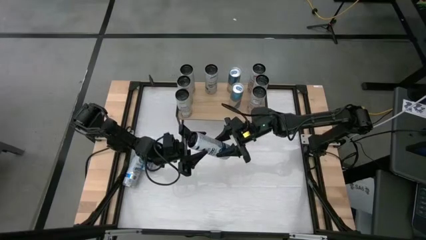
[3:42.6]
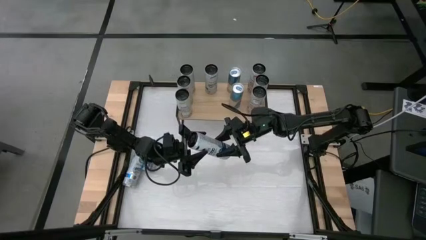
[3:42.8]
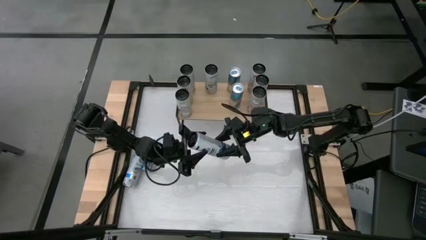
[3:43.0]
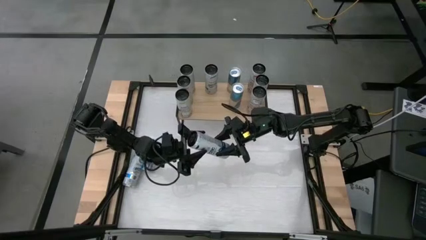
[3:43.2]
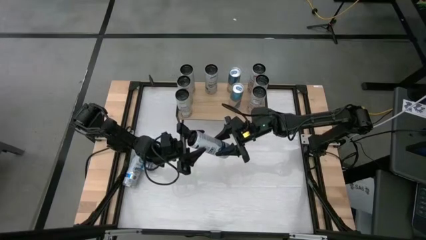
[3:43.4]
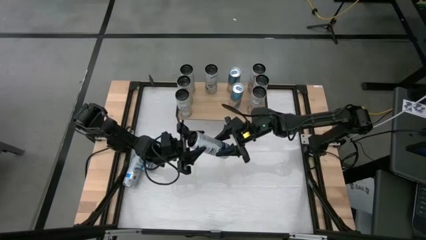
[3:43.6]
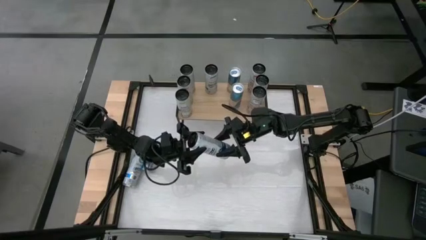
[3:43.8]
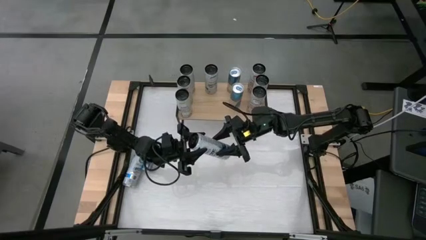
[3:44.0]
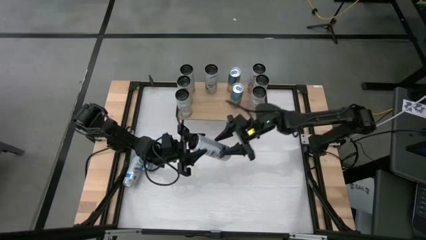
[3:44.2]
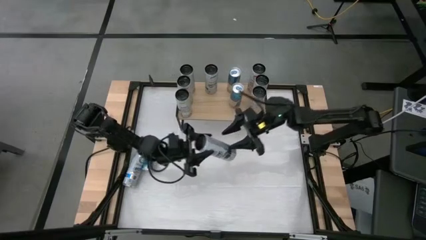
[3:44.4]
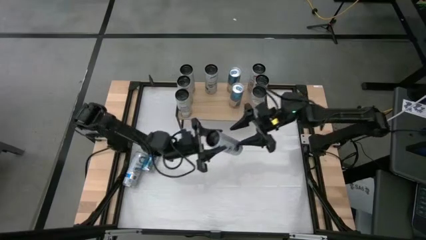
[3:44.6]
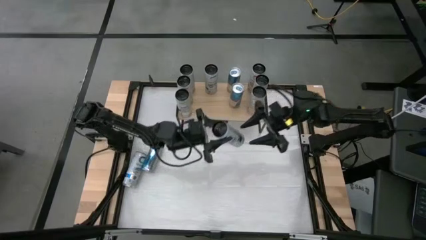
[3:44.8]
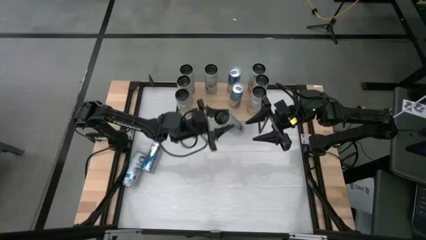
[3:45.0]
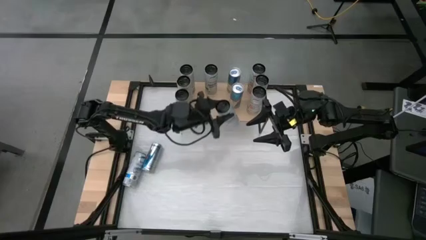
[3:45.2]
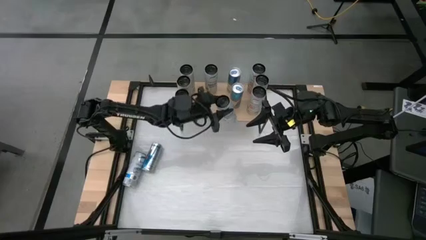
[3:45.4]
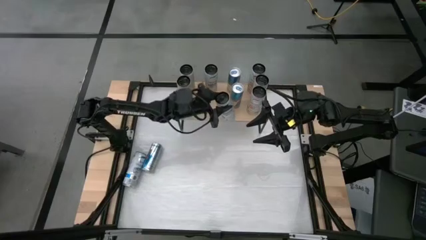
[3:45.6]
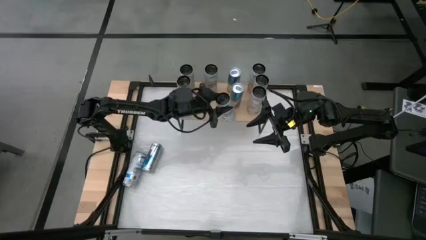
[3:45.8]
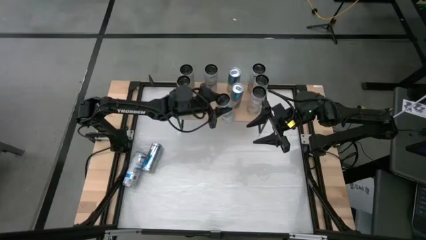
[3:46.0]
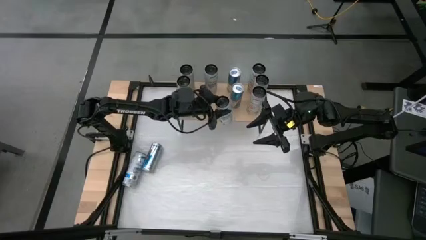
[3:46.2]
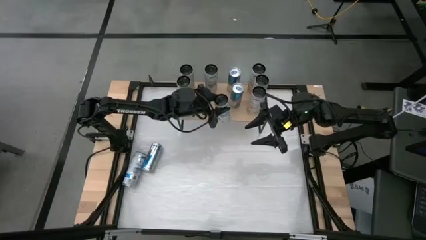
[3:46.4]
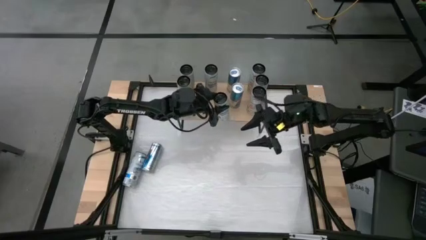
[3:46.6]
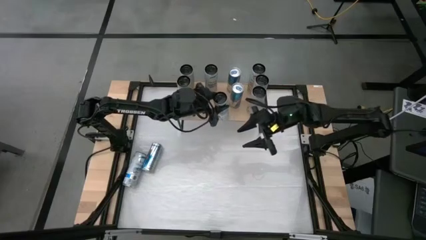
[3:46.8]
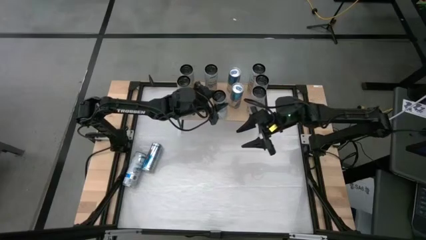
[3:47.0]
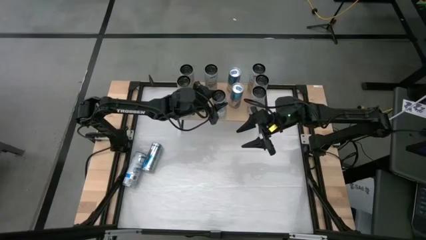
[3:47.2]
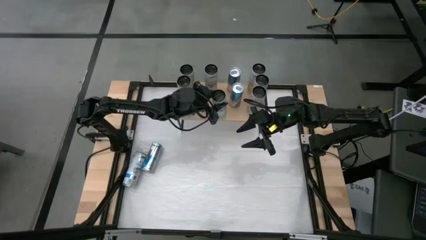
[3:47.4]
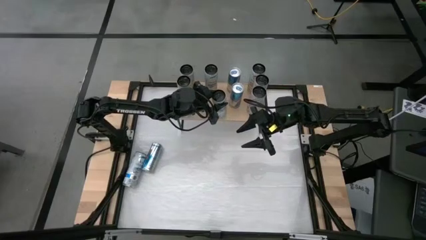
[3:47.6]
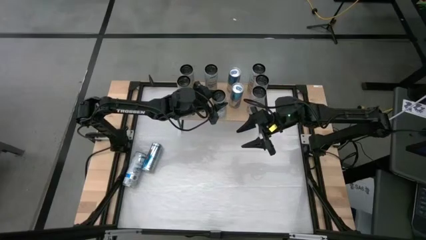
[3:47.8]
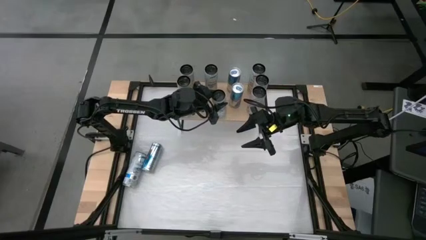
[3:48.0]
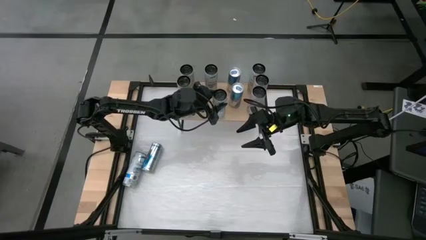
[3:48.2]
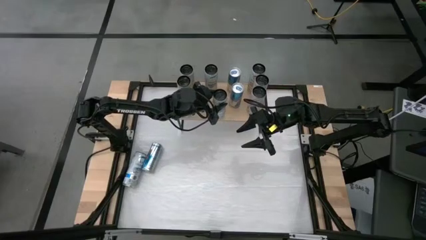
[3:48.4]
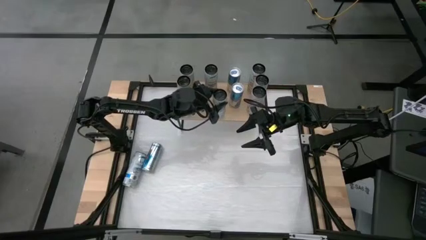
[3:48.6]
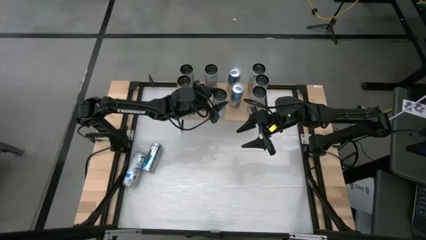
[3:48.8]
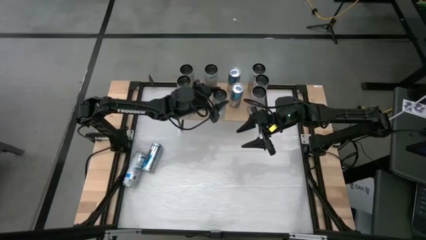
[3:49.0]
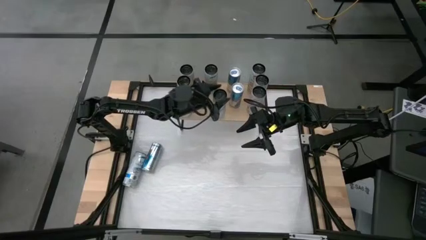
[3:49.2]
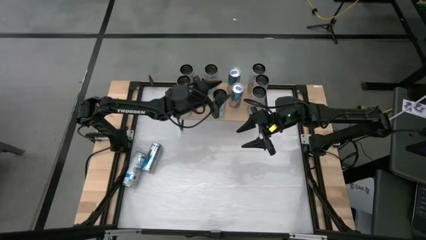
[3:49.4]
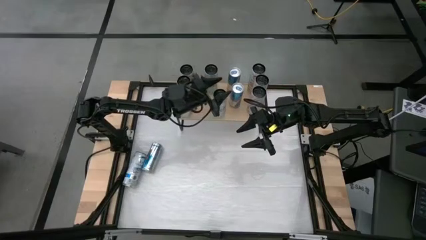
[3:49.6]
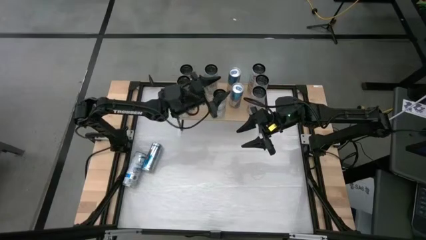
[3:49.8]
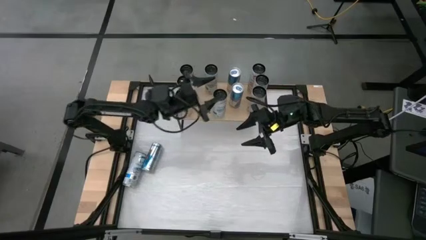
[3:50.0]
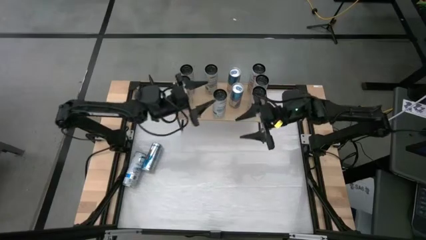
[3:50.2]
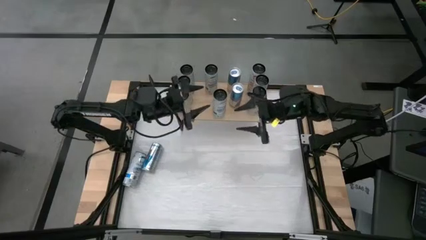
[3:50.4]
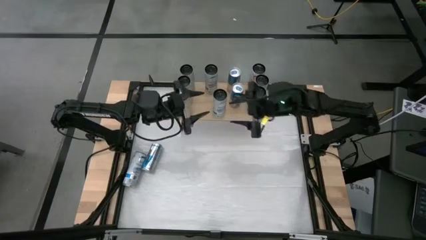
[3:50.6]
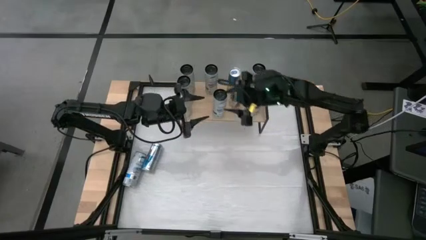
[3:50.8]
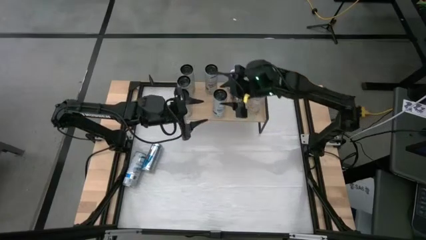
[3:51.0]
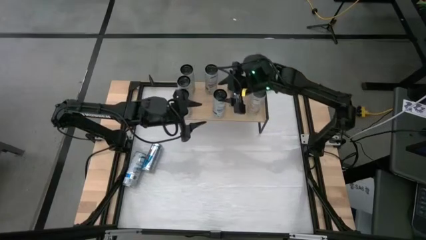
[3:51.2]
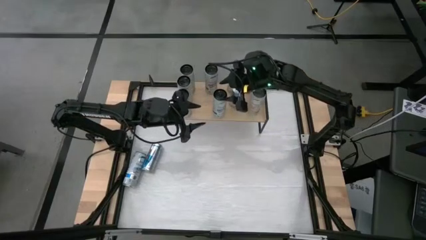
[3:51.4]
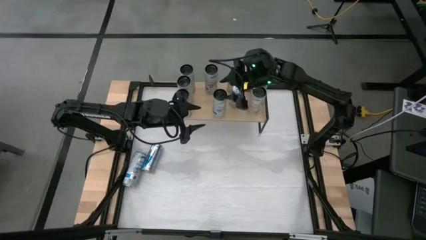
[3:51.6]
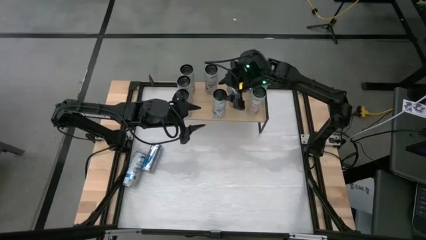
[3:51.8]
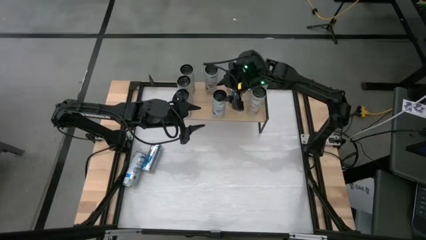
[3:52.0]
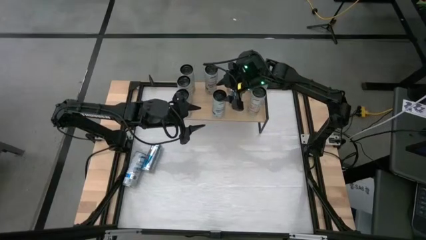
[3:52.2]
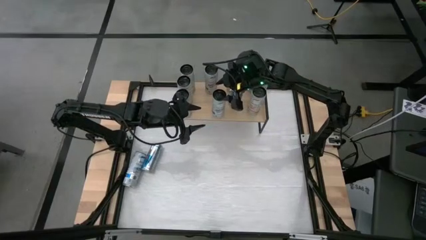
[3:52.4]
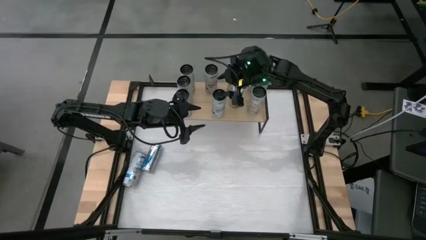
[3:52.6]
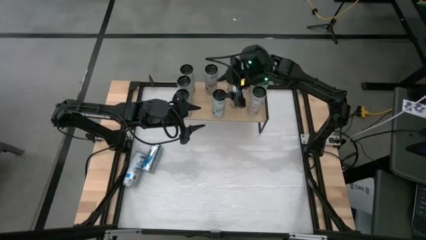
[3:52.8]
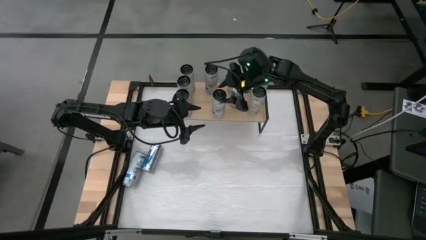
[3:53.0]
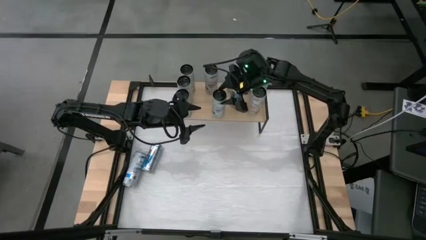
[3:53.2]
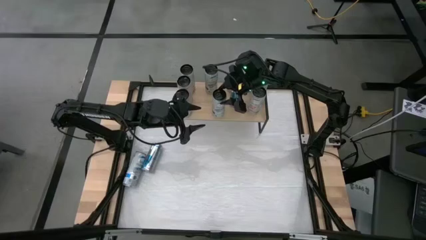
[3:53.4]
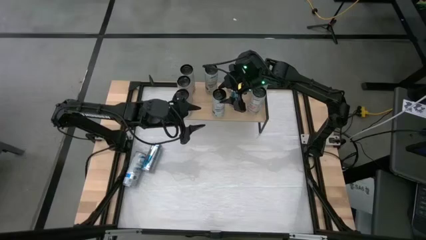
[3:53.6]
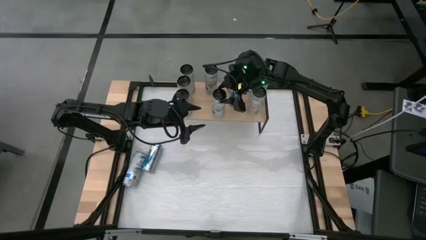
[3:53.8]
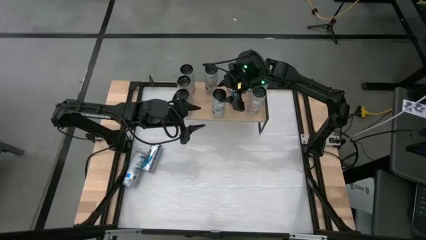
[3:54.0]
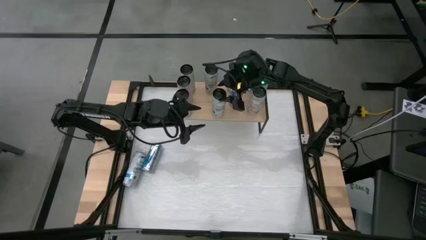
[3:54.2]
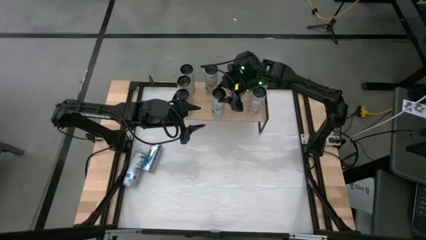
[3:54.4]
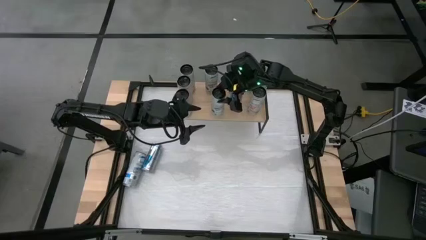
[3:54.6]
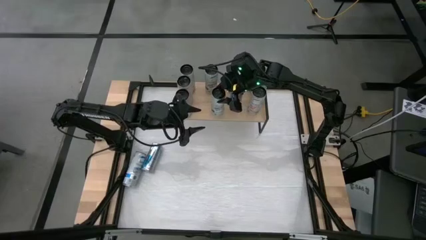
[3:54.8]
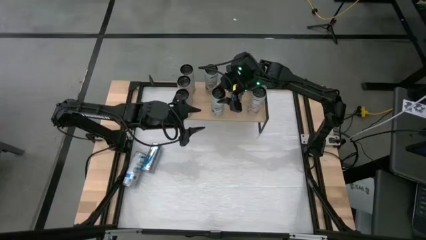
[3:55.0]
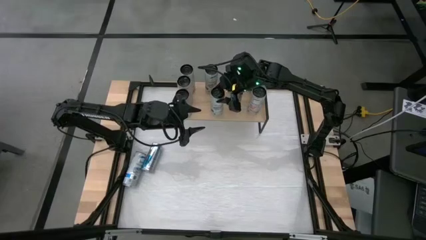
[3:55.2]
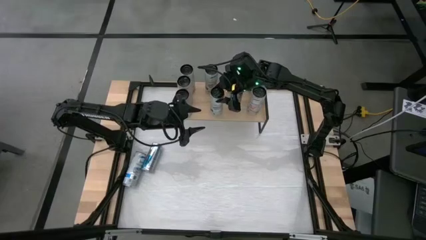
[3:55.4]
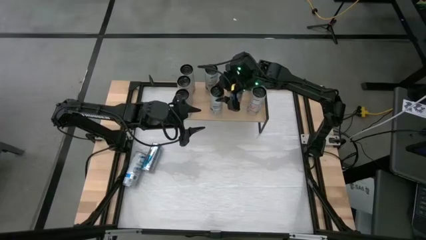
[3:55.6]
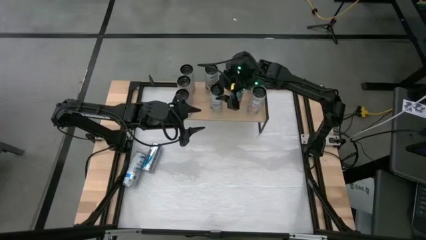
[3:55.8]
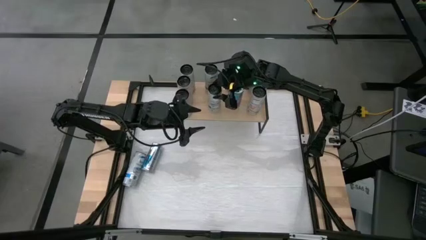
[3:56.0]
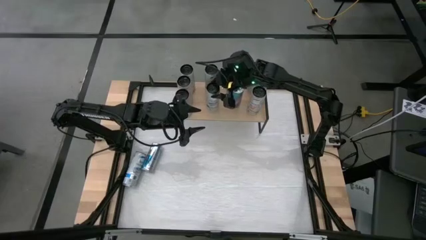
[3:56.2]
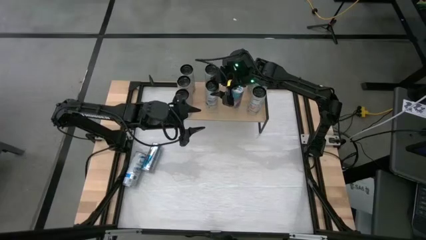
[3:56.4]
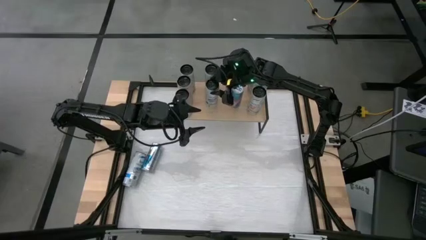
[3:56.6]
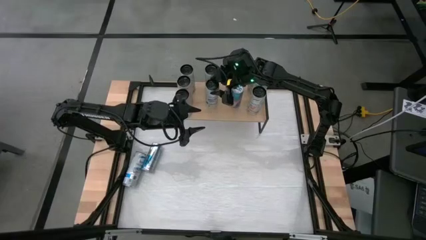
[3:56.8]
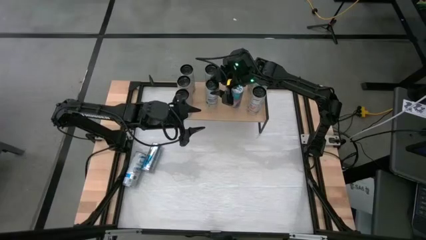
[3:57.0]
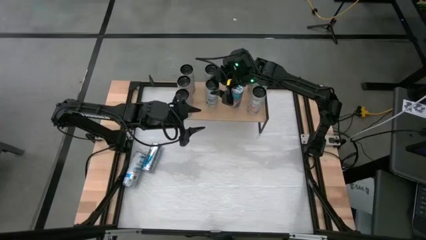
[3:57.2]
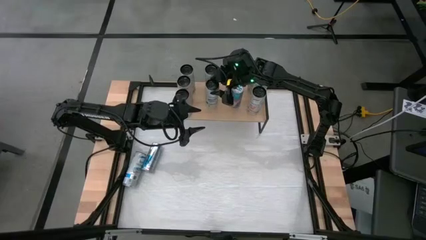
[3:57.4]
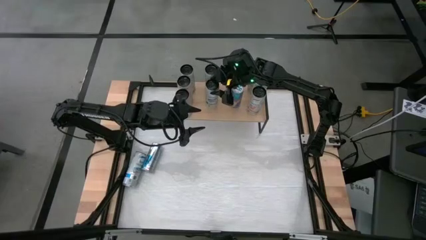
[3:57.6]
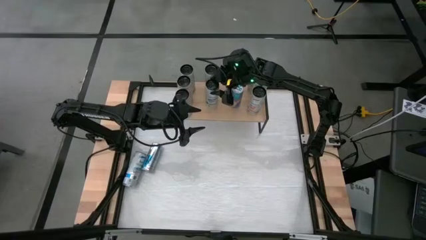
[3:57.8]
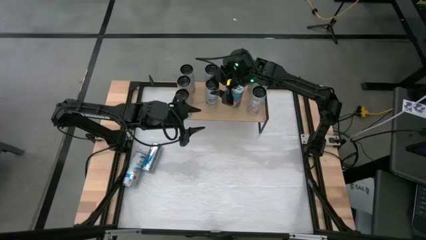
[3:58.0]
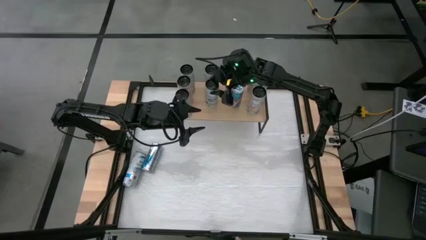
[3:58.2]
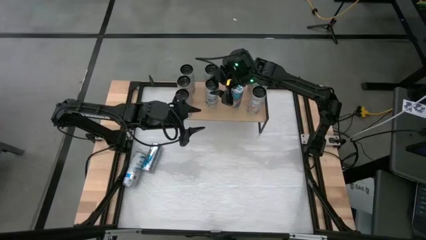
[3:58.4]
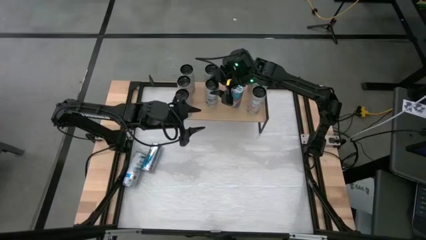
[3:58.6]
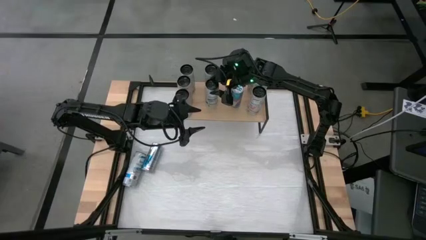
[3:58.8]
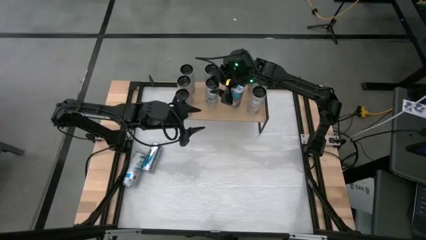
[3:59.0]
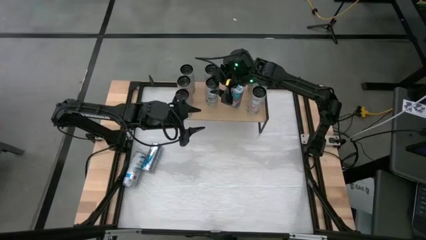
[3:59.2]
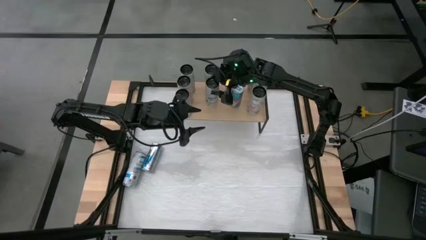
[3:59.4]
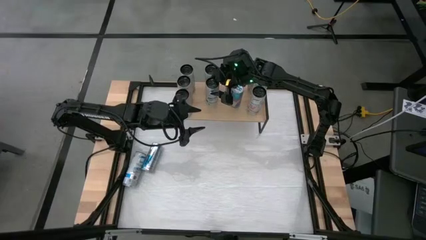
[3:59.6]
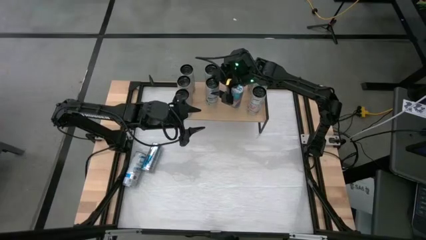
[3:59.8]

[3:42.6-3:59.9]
Task: Sort soda cans
Put the right white blue soda can on the shelf and align with other white blue soda cans
